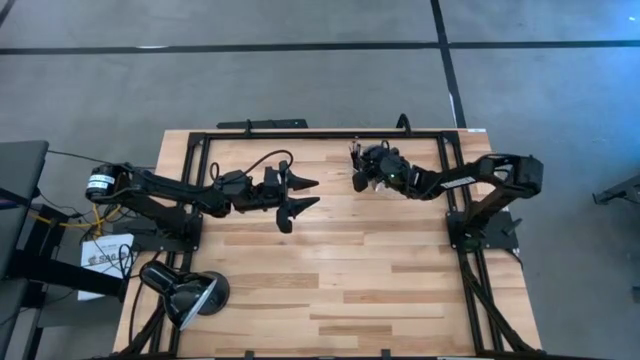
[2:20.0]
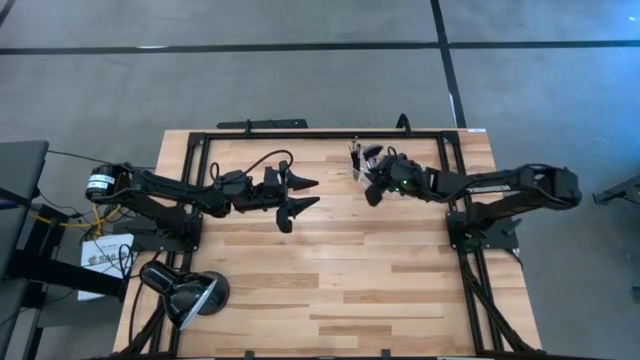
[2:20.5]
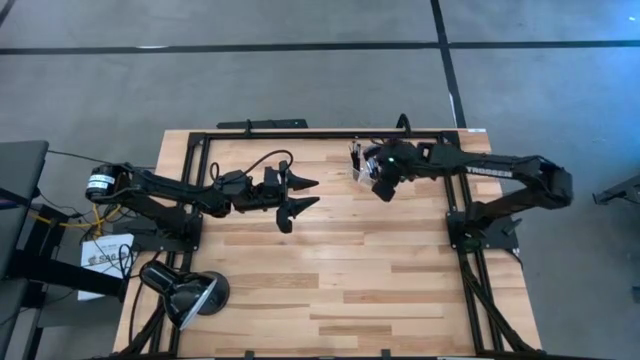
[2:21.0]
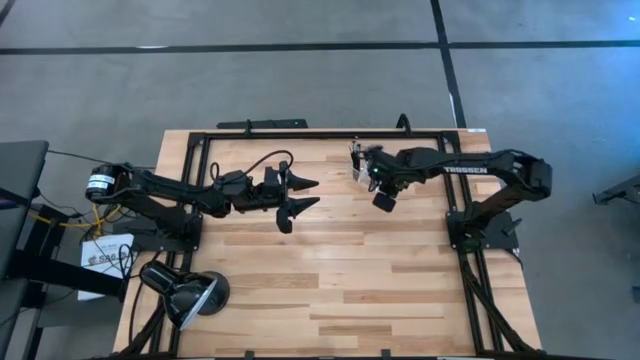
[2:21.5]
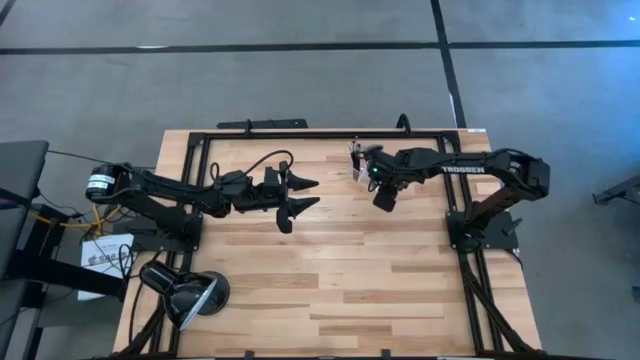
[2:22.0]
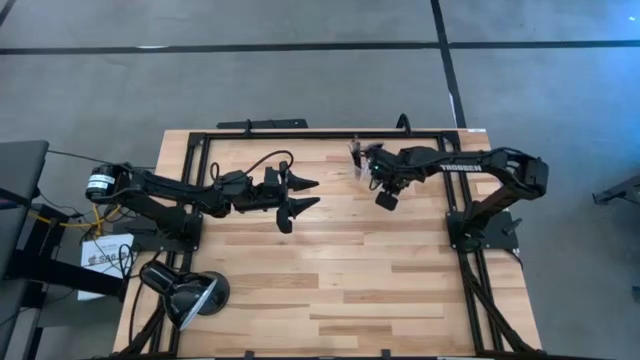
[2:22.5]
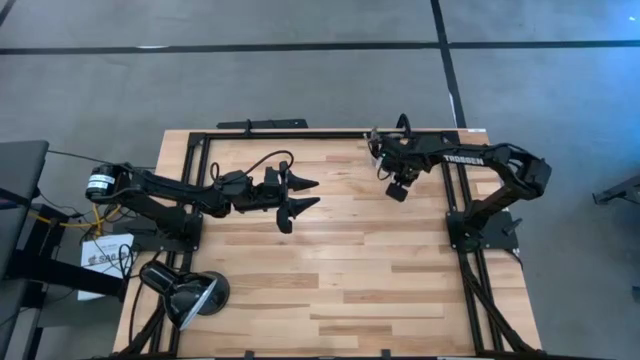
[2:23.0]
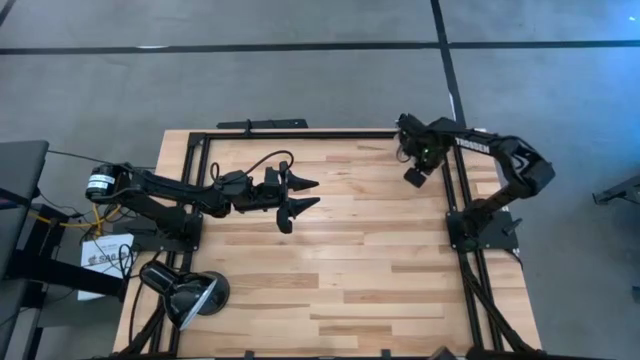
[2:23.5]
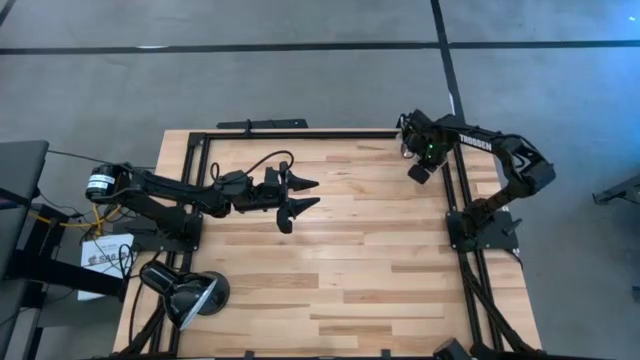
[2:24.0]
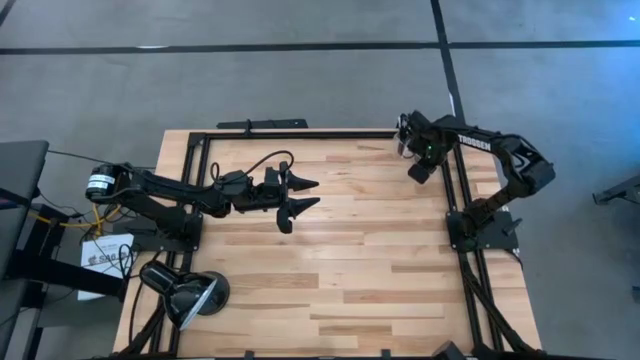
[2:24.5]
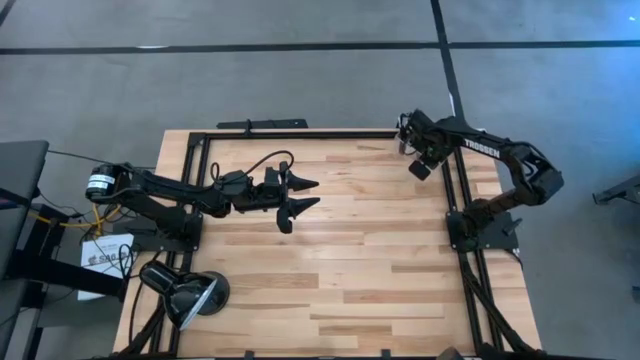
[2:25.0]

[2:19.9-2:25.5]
Task: Put items in baskets/containers
Adjust the transparent organizer

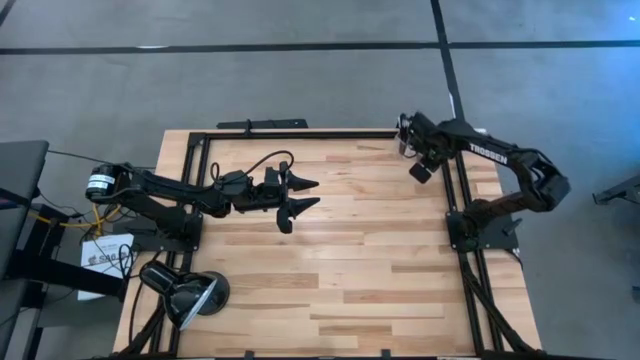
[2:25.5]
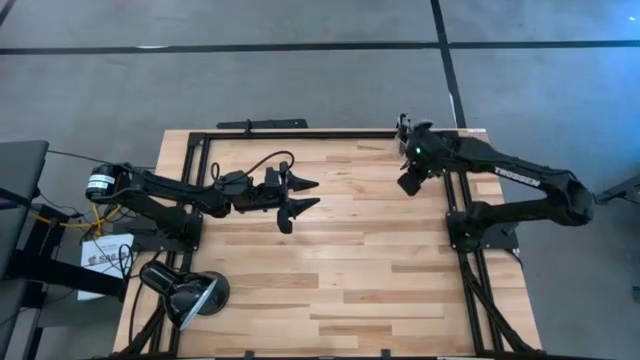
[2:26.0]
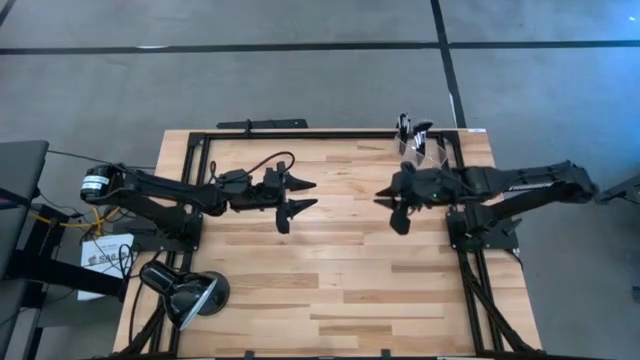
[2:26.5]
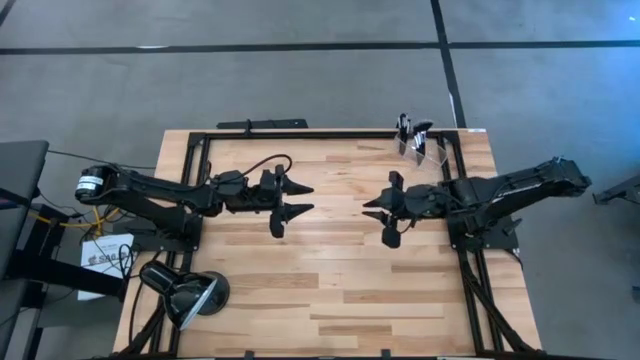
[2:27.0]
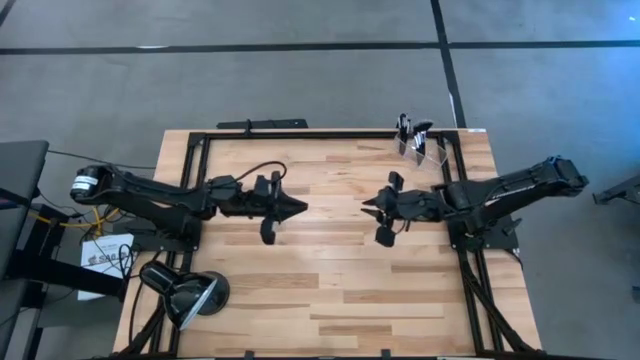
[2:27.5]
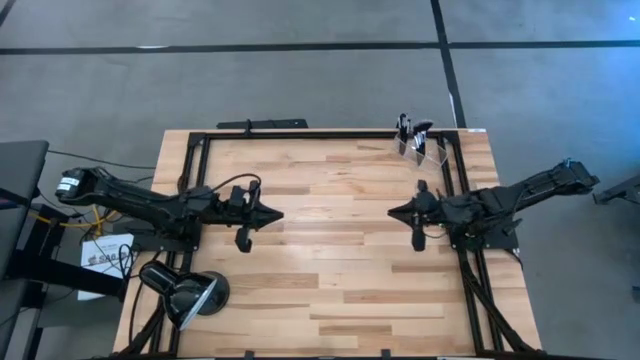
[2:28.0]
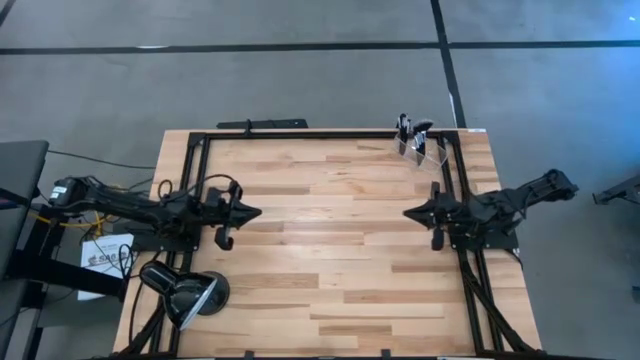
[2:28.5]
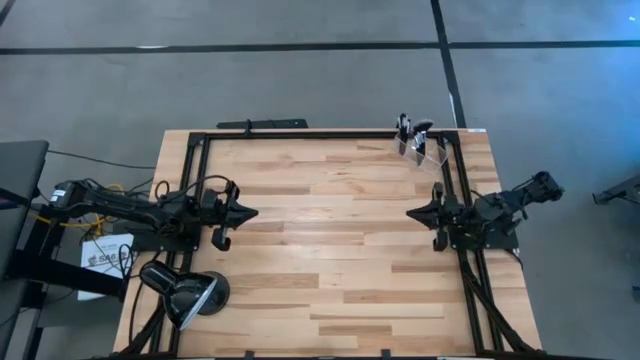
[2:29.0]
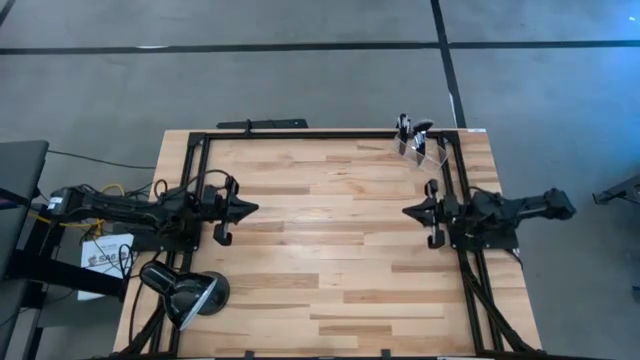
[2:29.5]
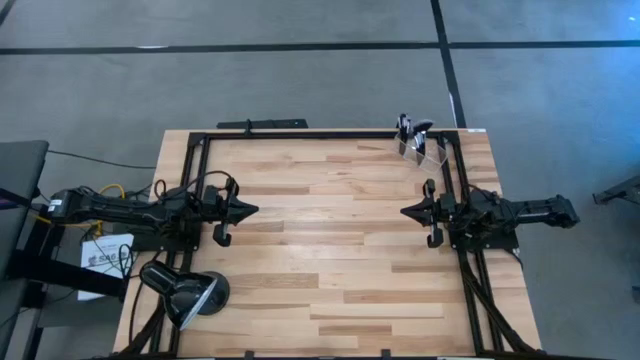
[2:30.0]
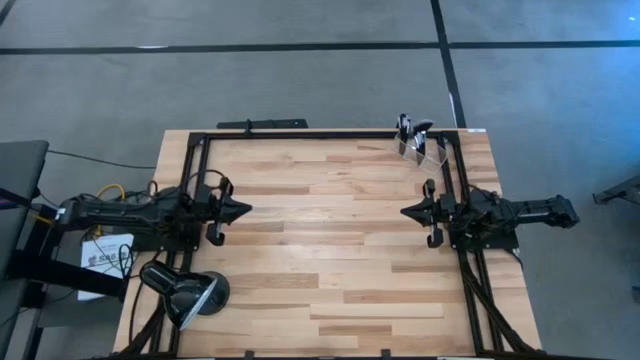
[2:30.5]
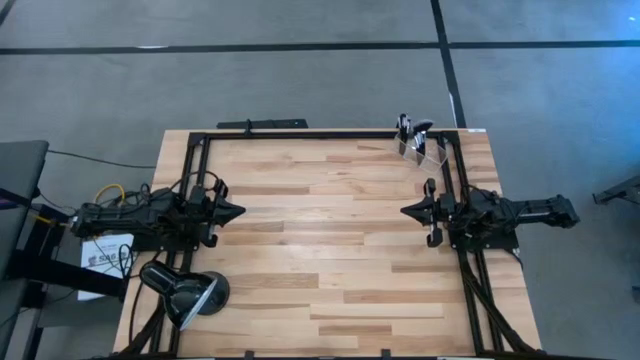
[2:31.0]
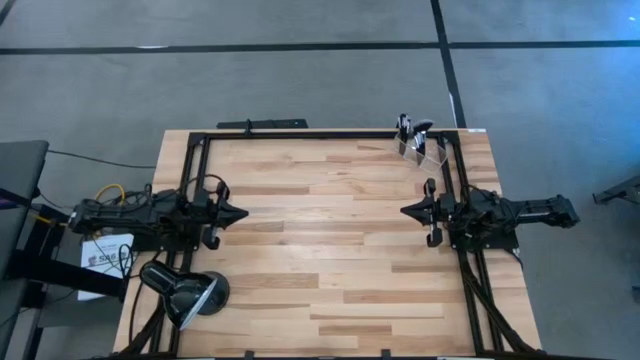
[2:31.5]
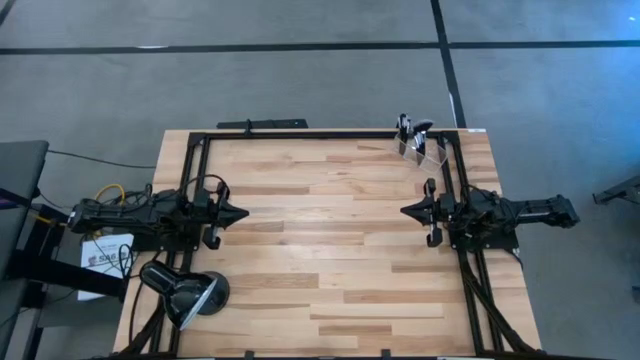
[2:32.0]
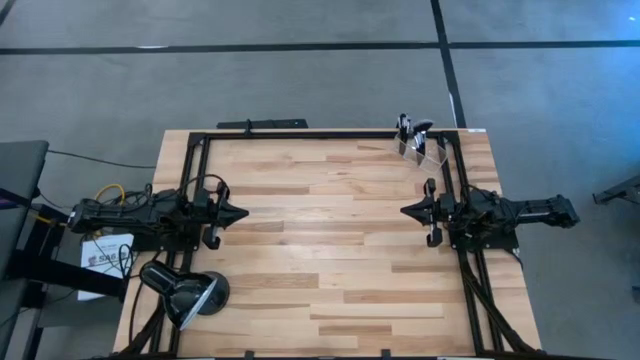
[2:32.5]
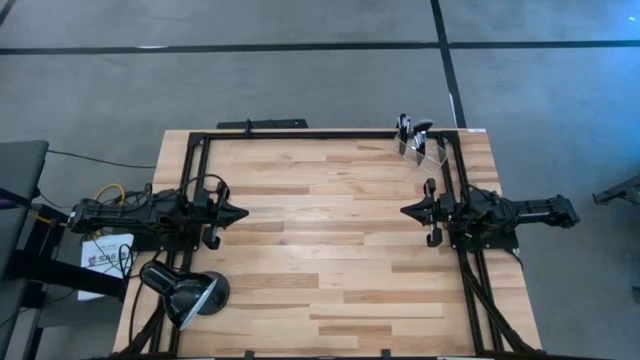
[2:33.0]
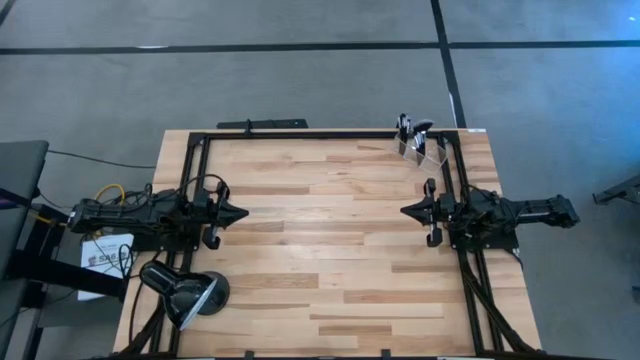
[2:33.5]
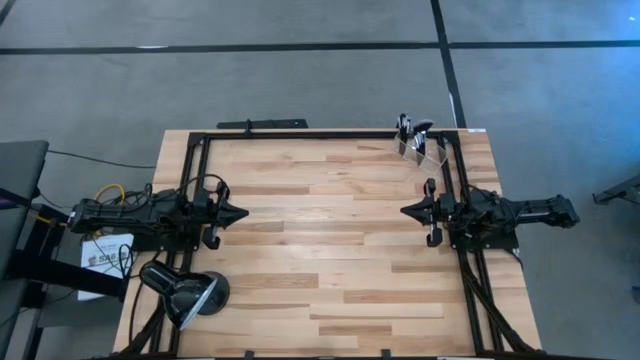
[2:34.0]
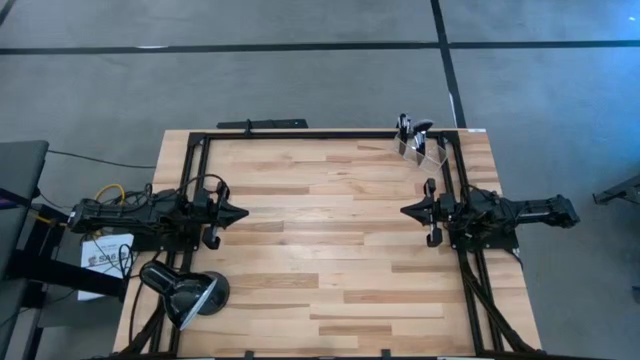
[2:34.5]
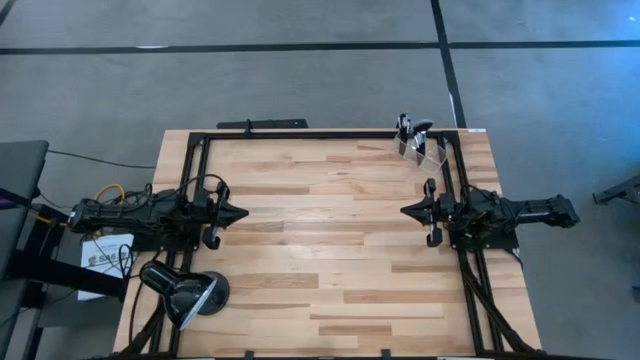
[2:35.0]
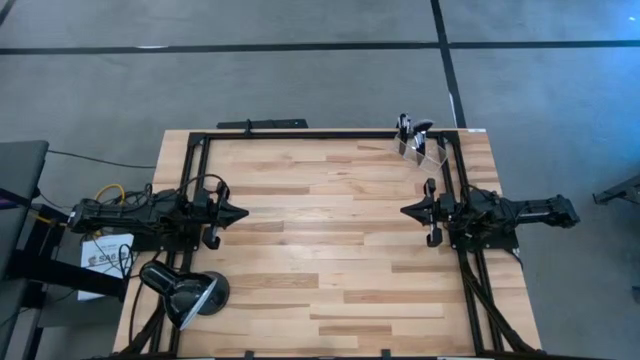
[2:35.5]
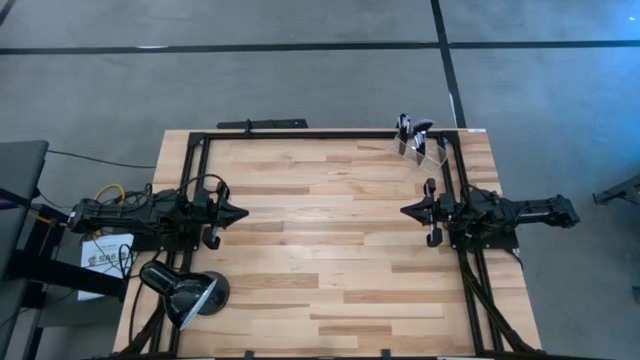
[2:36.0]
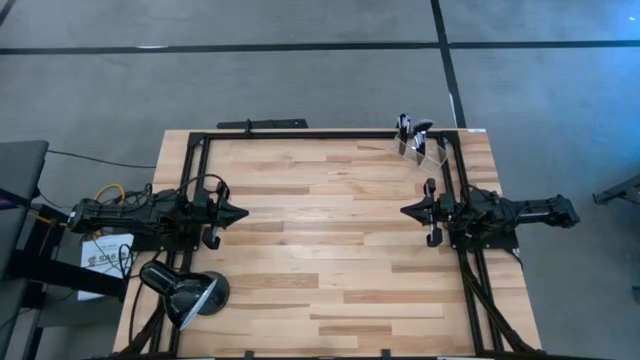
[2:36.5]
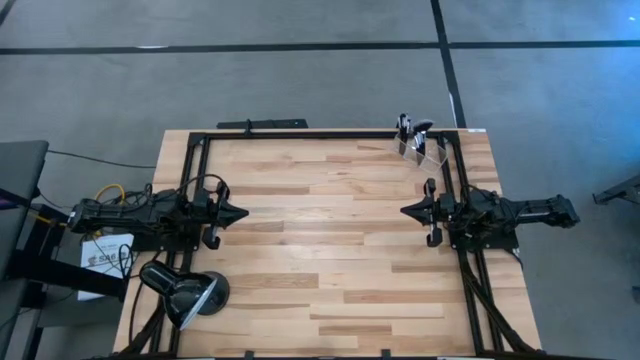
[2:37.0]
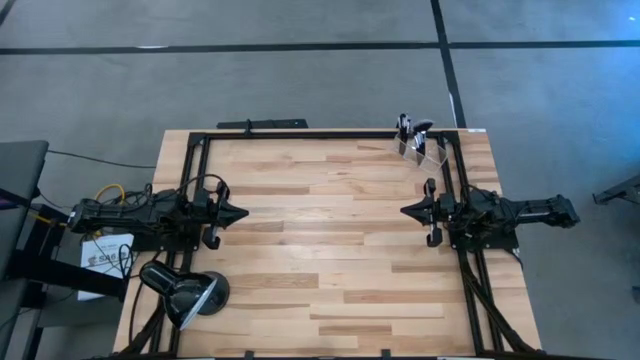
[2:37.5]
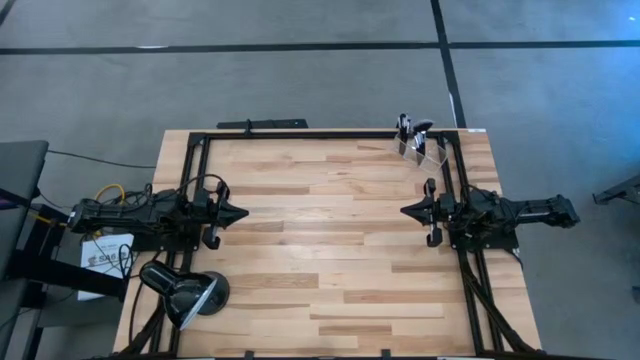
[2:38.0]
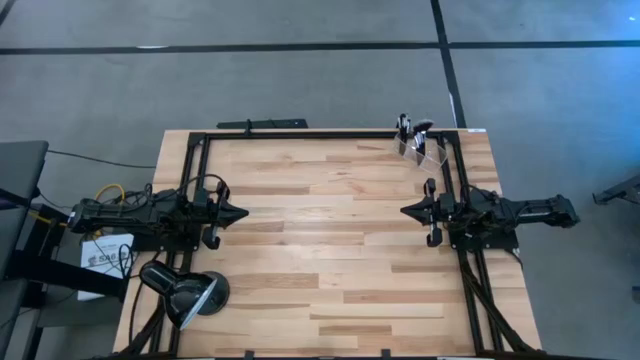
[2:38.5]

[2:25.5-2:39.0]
Return to Home Position

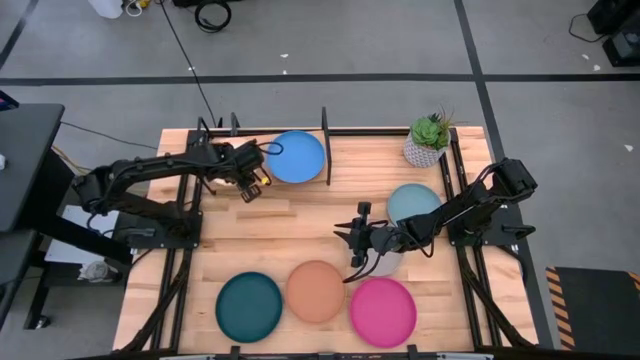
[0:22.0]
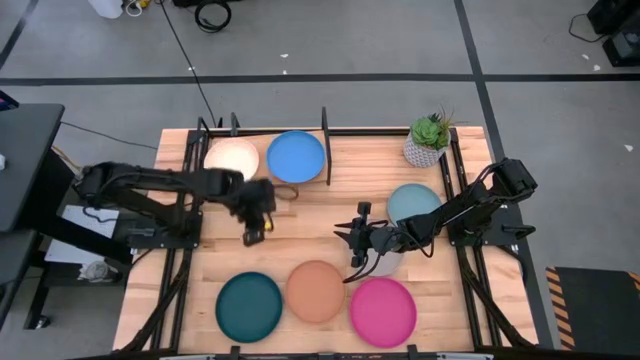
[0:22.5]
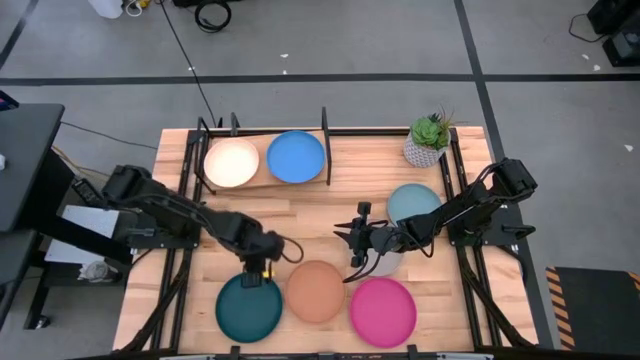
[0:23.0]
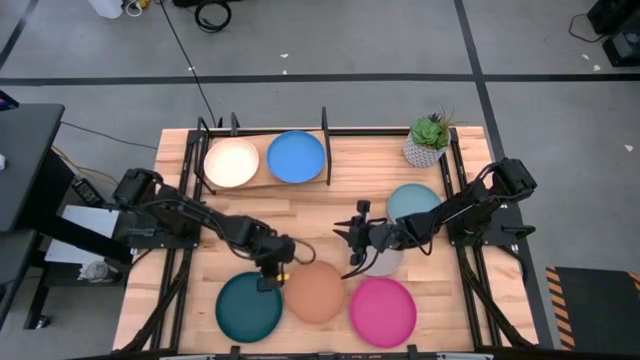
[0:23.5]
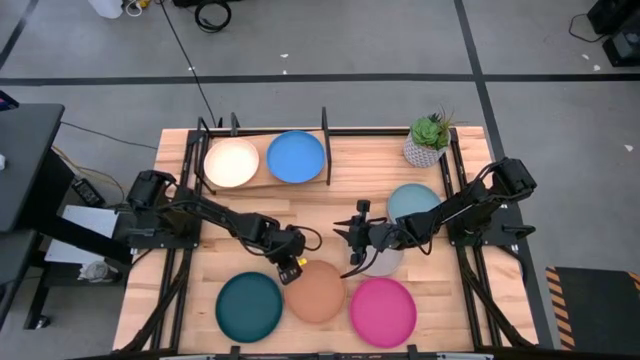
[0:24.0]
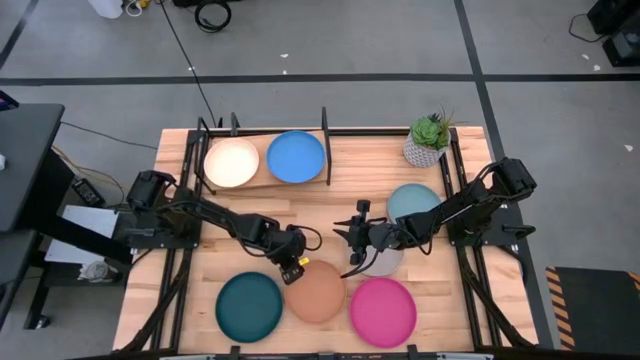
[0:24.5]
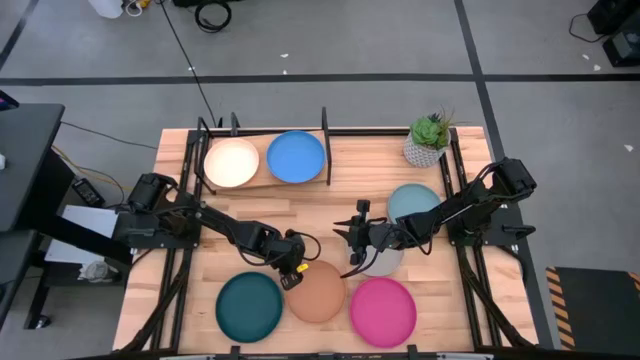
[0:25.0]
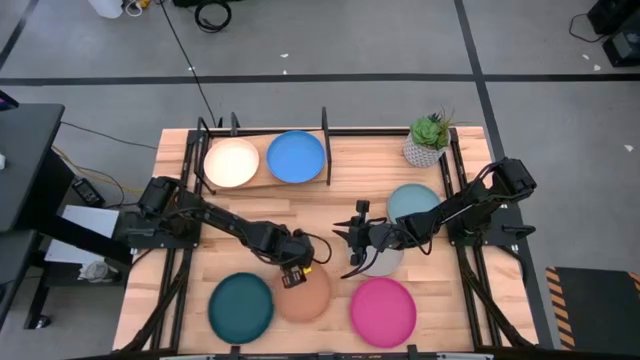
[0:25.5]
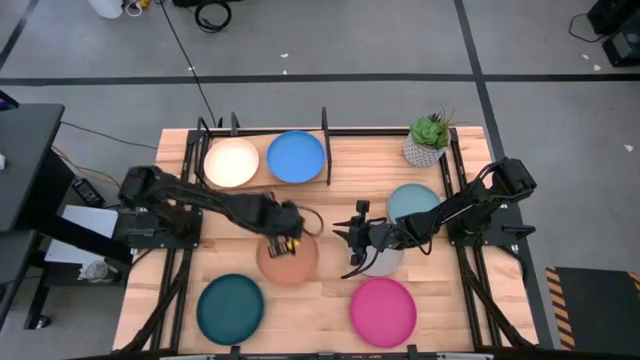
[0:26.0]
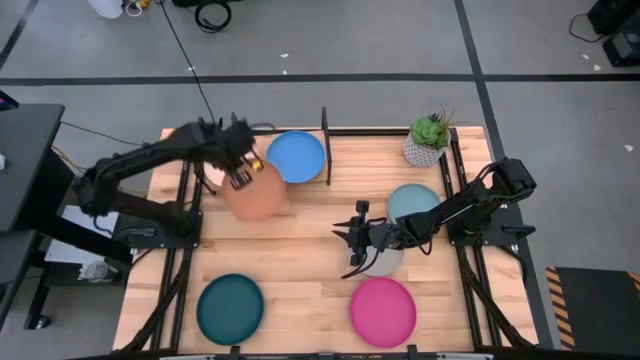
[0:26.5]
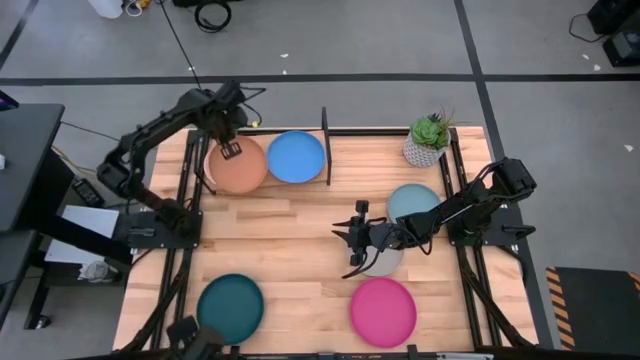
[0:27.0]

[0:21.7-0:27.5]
Task: Place and stack plates onto a shelf
Stack the light brown plate on the light pink plate
